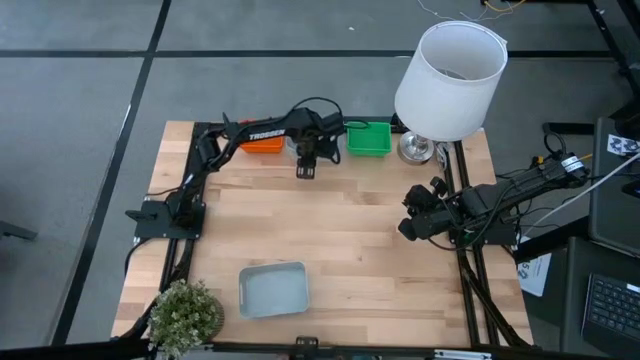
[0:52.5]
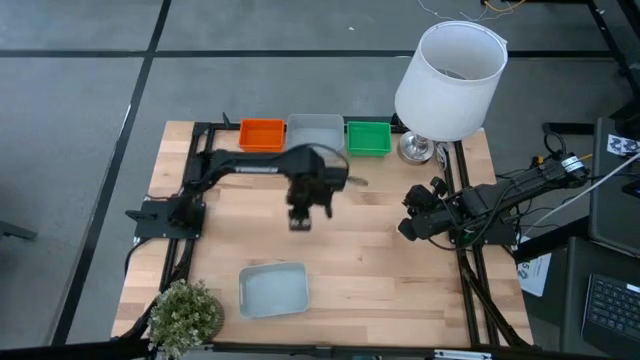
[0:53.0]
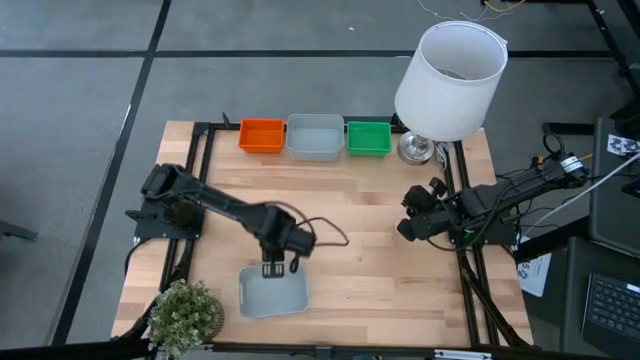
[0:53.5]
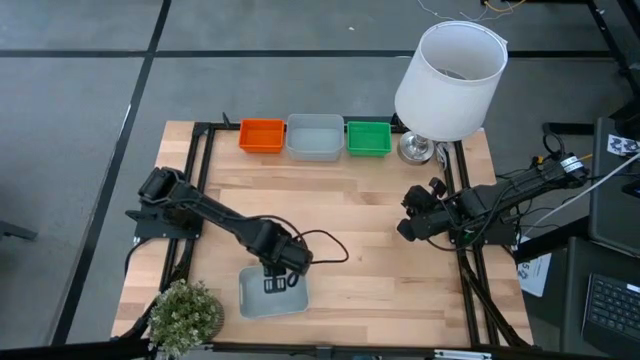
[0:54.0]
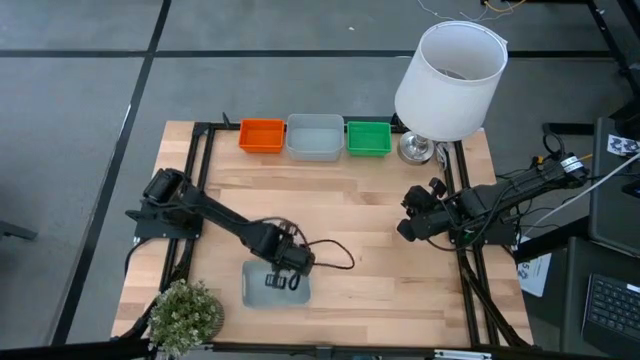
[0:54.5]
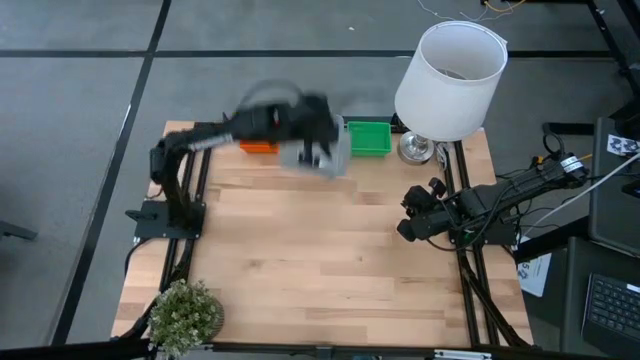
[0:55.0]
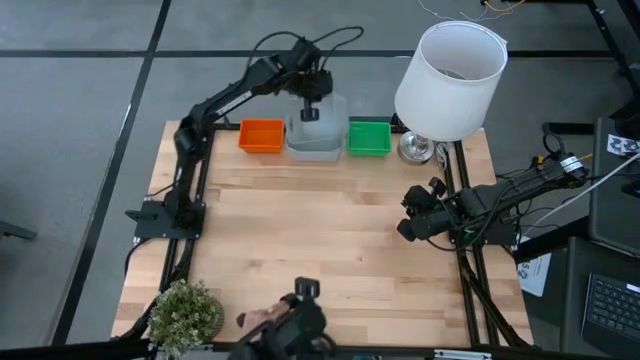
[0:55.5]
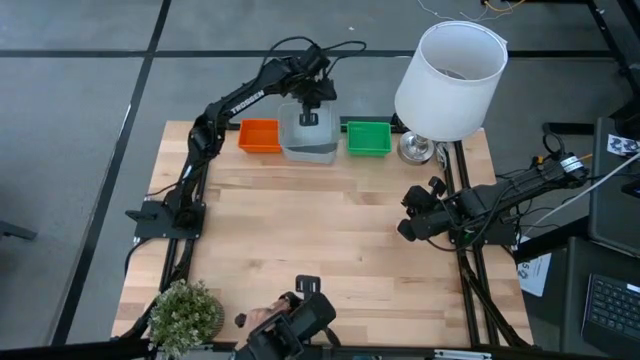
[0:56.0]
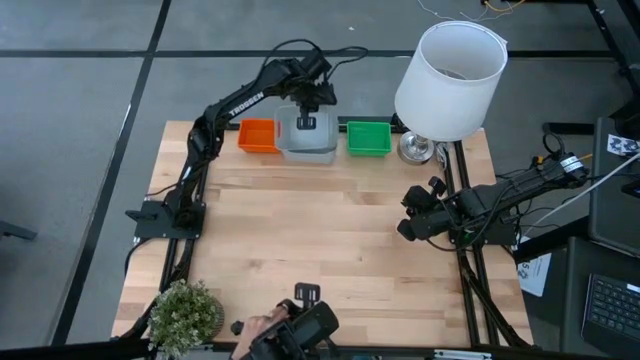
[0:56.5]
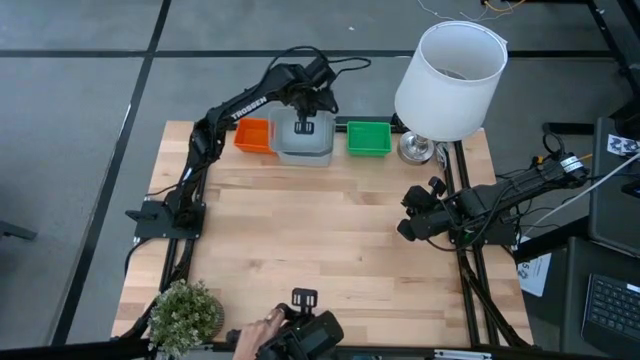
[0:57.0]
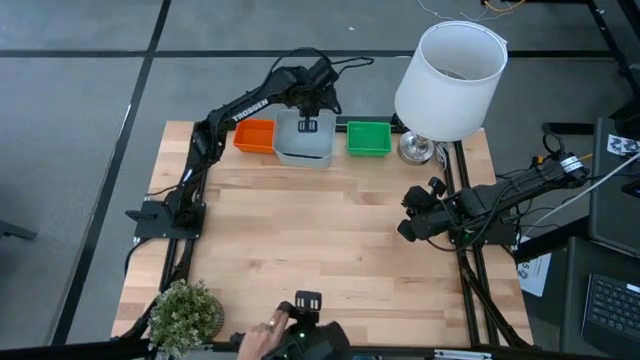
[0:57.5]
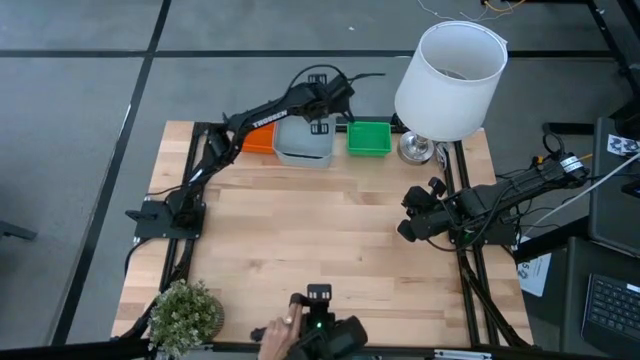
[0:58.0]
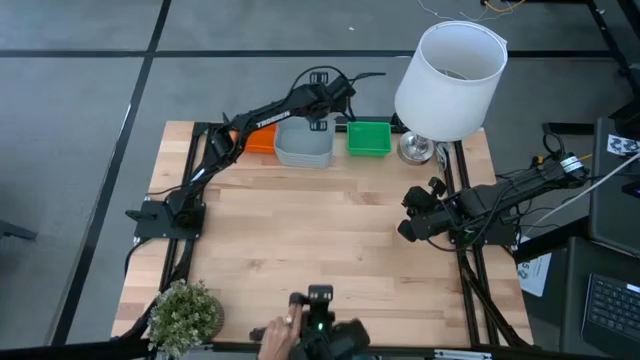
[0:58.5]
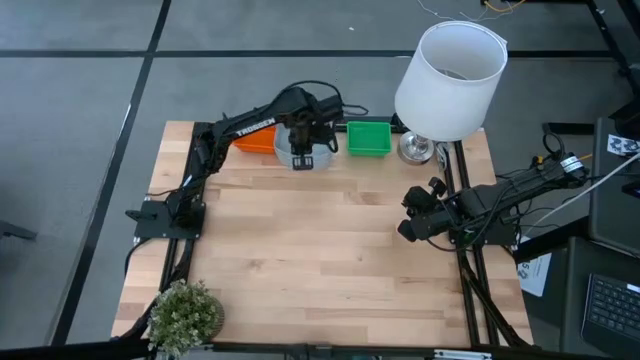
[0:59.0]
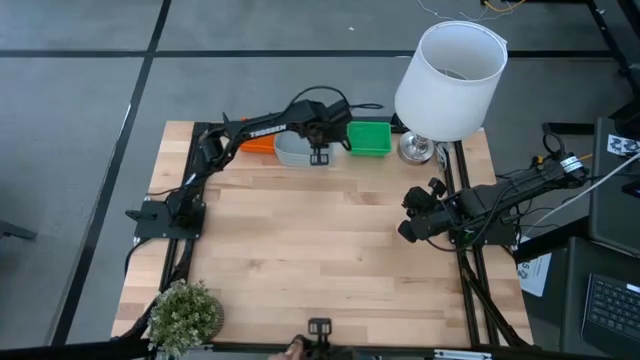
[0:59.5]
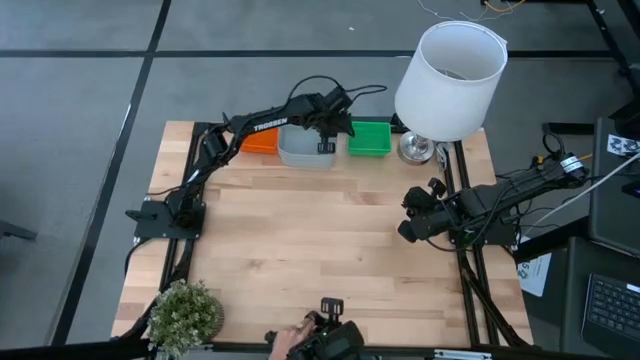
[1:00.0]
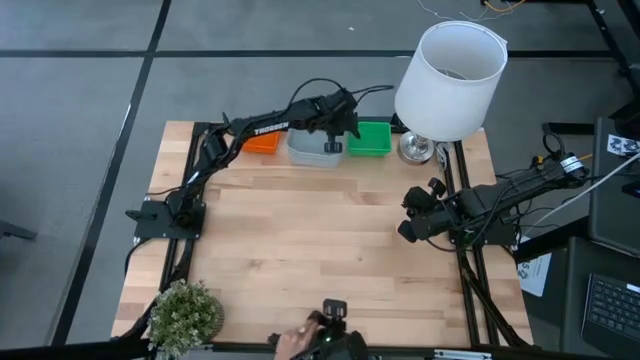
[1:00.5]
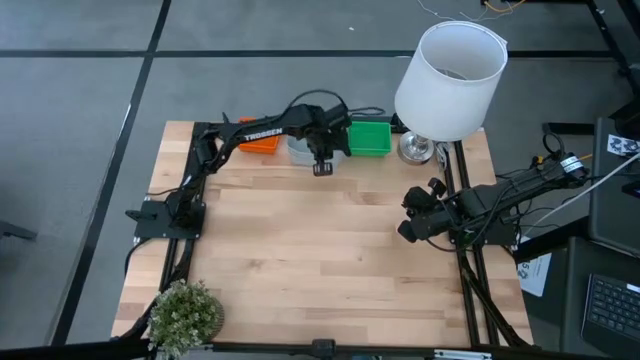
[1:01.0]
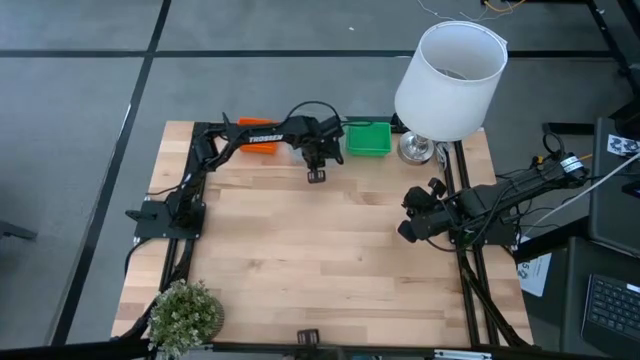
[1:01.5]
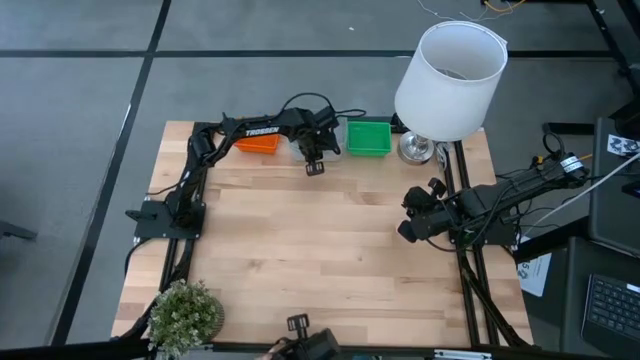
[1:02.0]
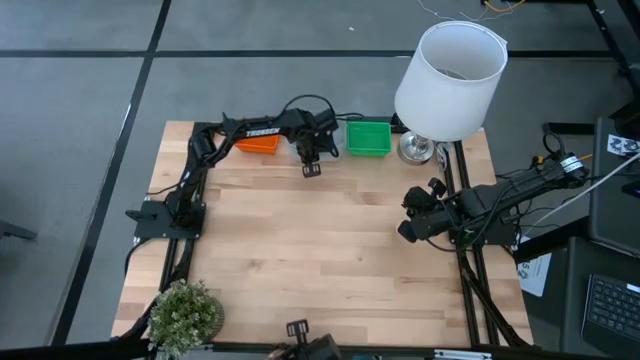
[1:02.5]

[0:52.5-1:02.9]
Stack the bottom gray bin on the gray bin

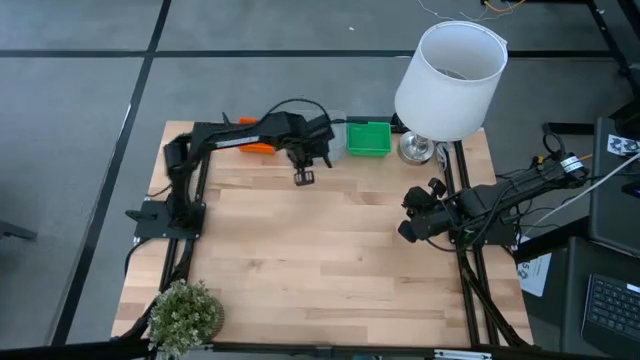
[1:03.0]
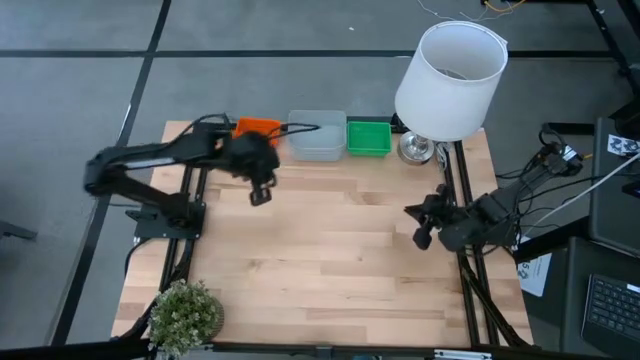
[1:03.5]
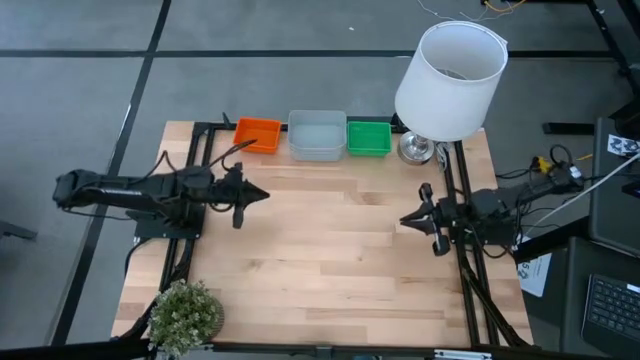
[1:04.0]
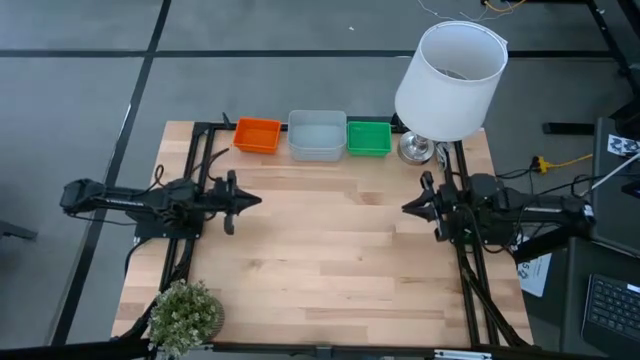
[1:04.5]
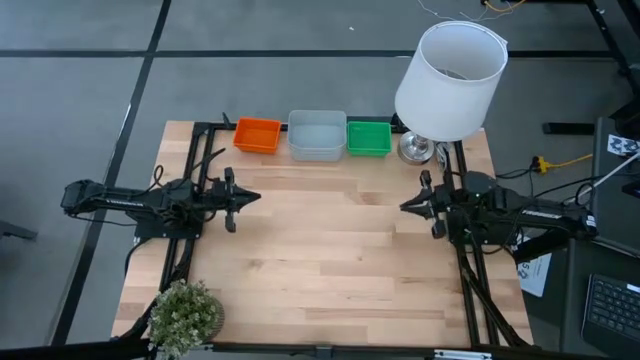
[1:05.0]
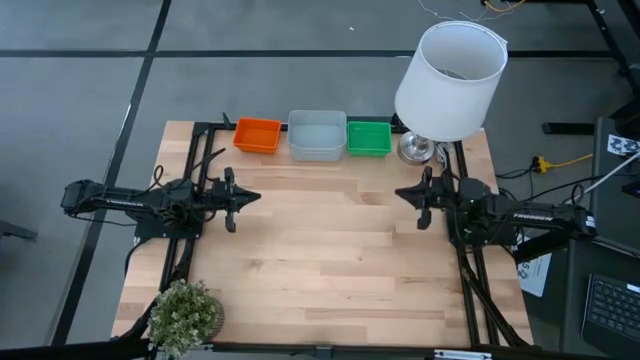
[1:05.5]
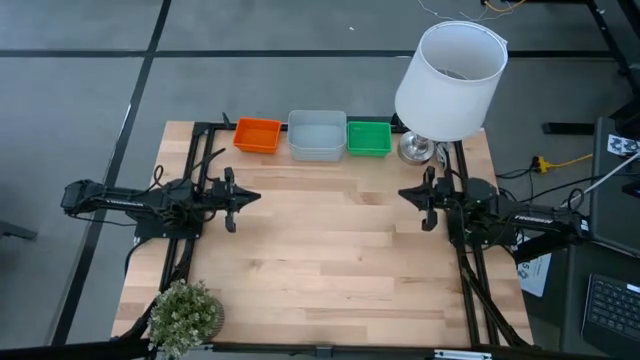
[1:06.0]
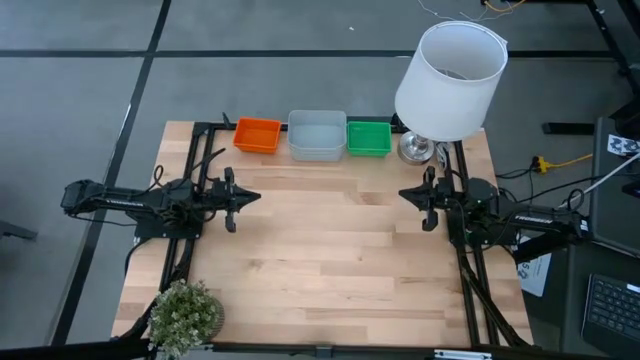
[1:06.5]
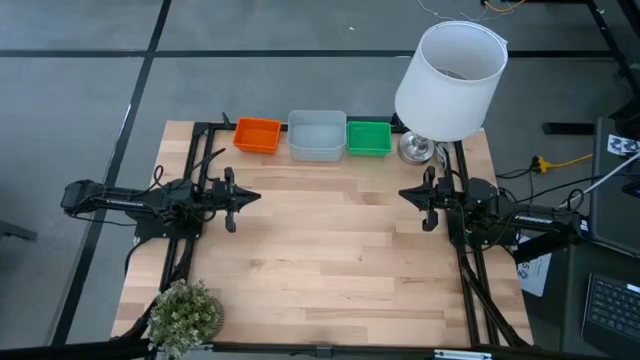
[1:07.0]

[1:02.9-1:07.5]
Return to Home Position
